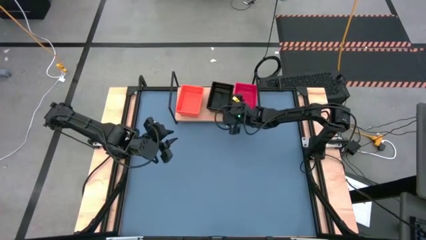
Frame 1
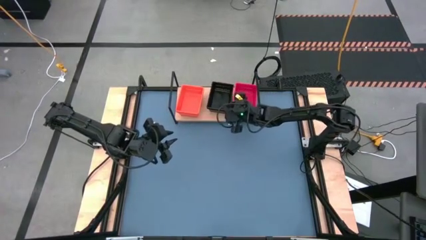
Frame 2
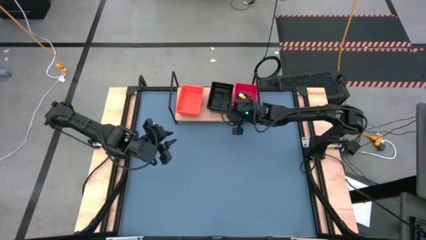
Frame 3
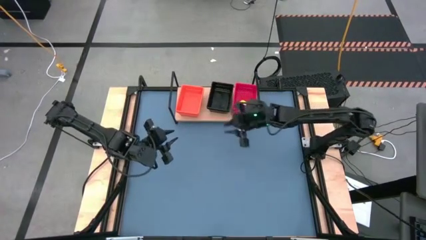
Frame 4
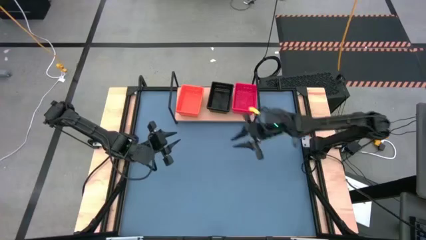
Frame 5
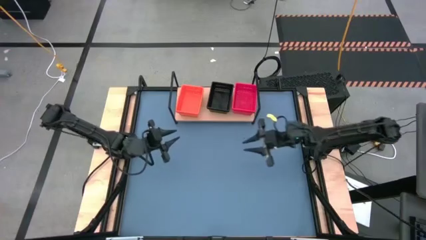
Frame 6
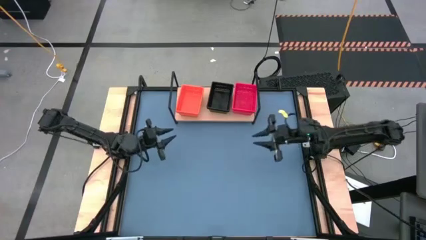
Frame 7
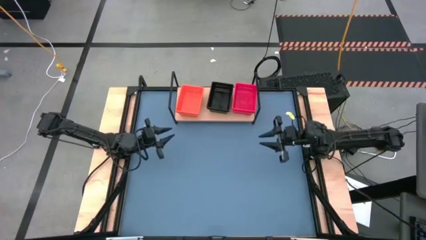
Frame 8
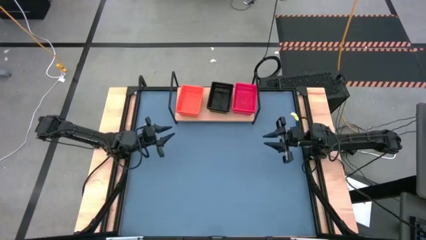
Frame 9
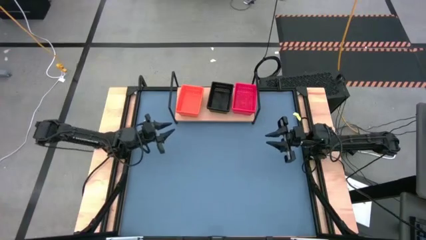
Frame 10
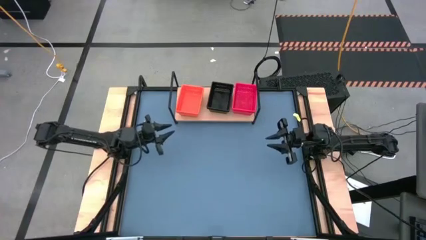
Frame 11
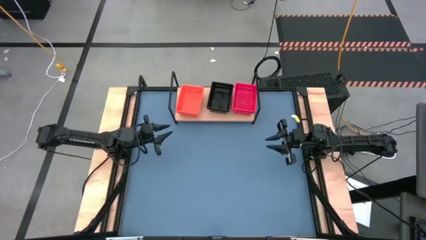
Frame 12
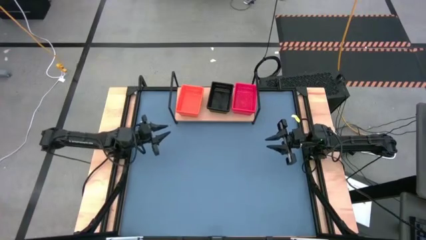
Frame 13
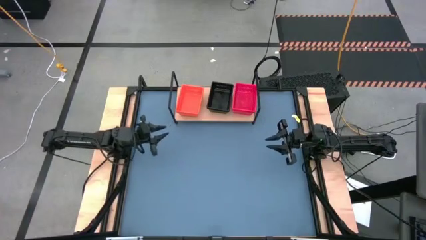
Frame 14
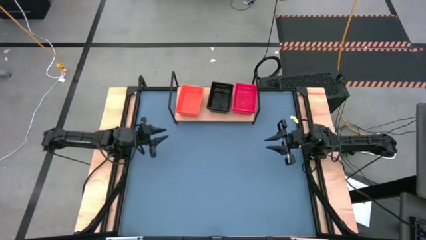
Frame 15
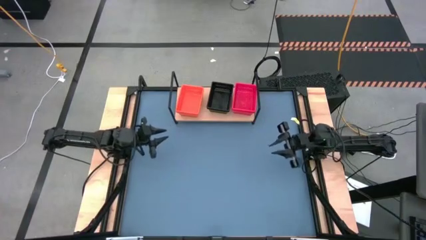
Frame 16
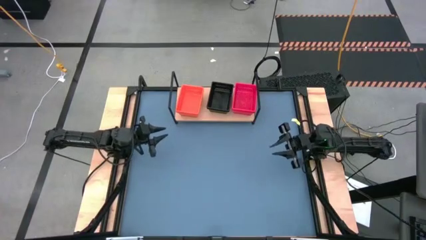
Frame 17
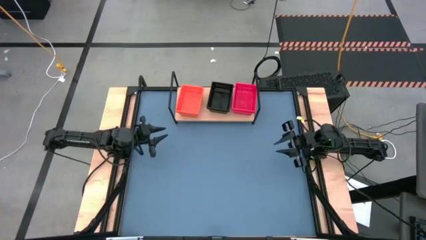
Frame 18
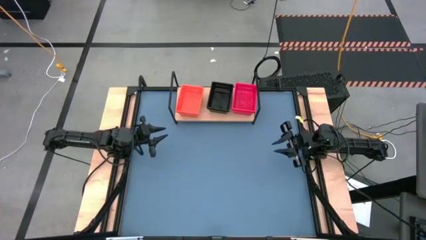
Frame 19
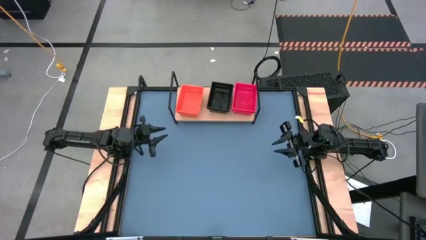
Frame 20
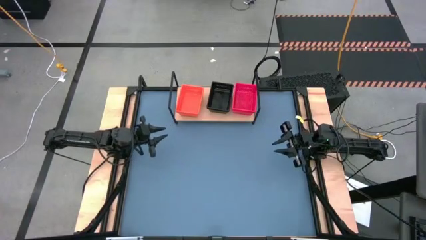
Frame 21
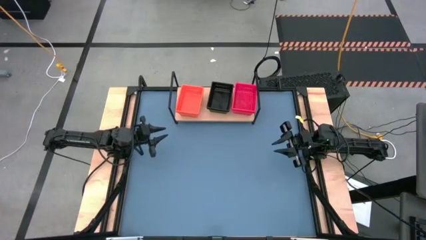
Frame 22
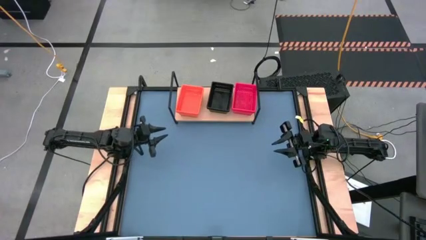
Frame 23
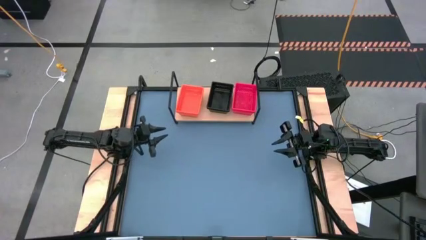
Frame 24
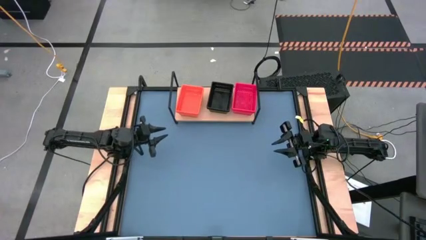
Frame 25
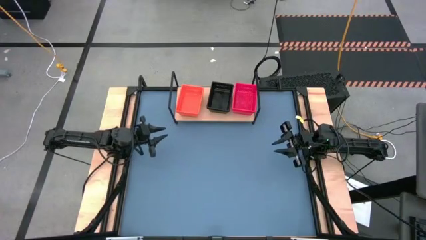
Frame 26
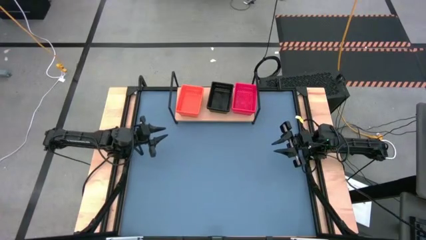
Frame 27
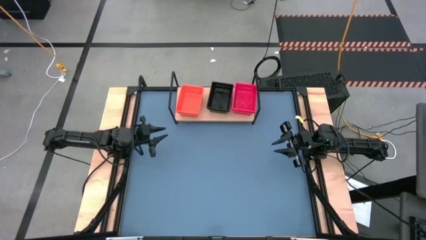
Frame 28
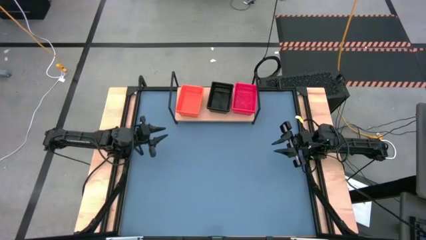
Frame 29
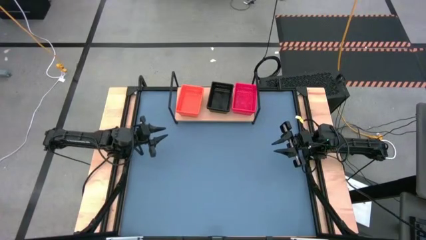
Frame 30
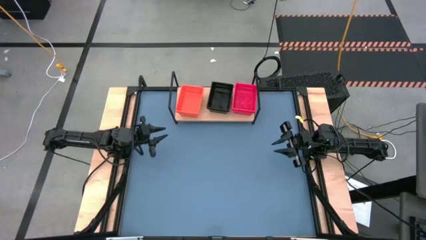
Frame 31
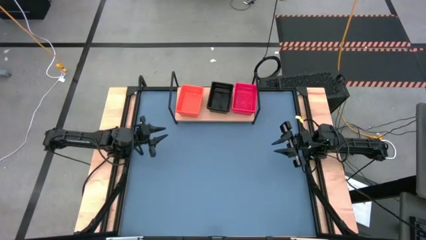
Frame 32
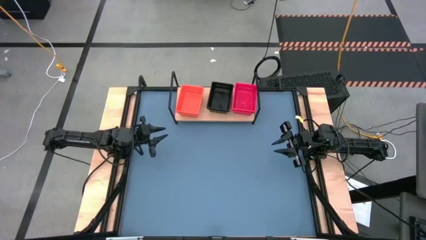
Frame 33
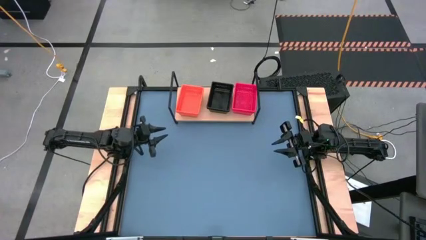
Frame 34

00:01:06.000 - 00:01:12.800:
Task: Stack baskets on shelf by color
Return to Home Position

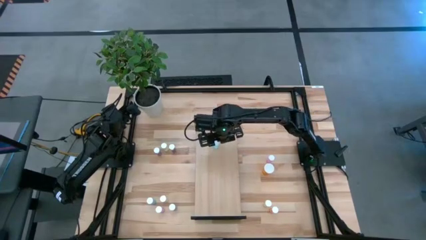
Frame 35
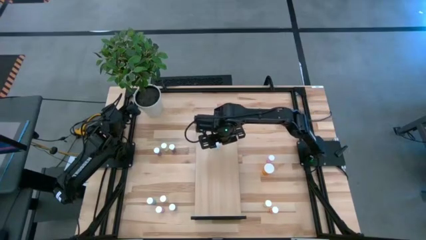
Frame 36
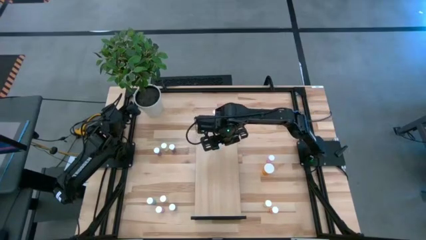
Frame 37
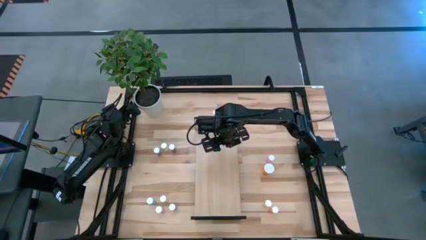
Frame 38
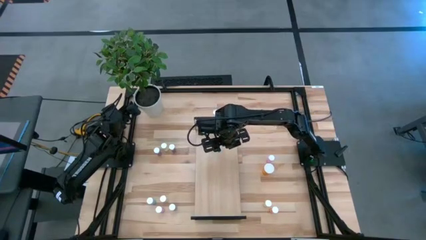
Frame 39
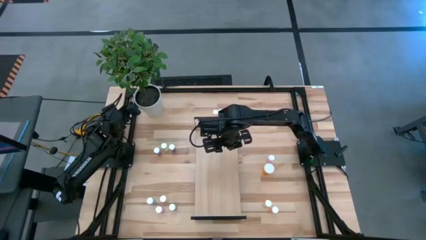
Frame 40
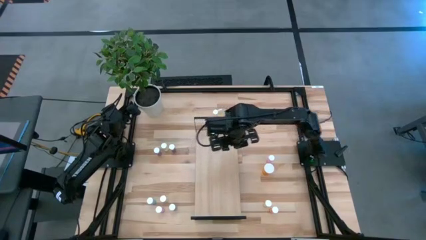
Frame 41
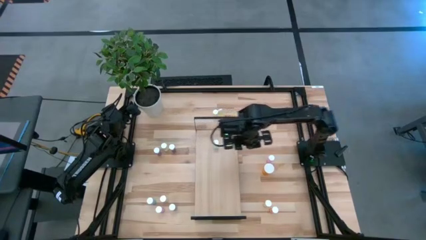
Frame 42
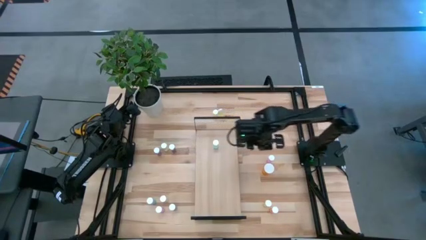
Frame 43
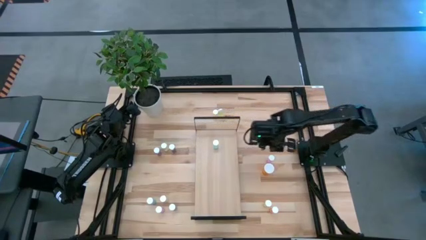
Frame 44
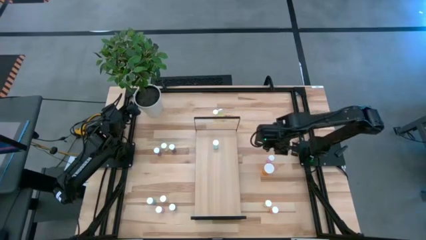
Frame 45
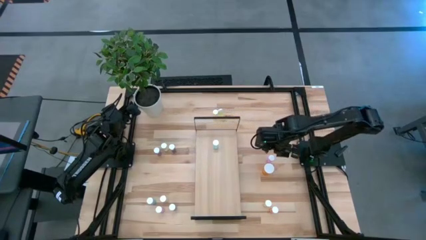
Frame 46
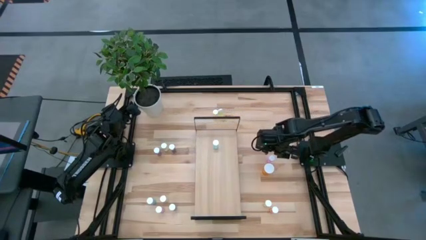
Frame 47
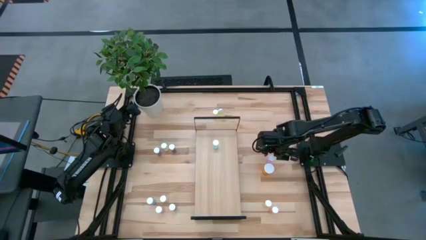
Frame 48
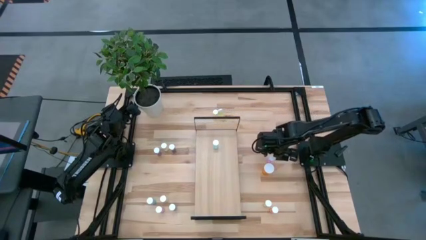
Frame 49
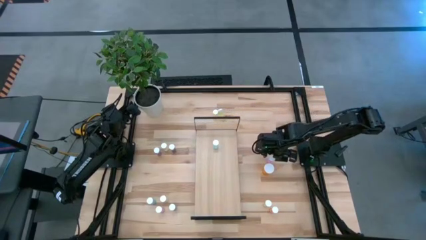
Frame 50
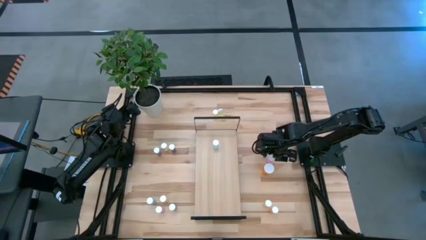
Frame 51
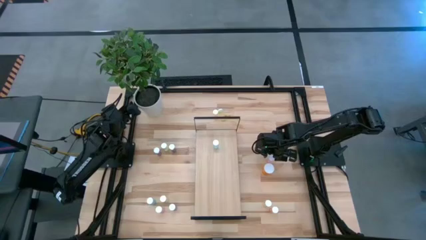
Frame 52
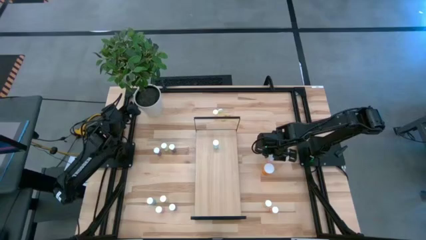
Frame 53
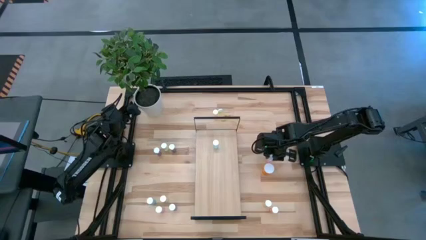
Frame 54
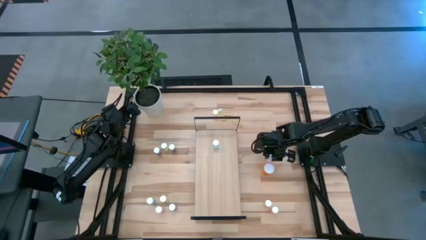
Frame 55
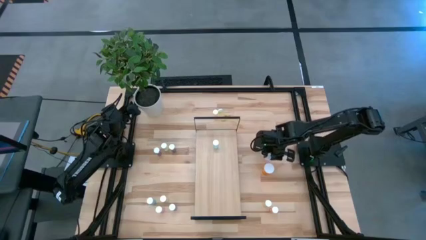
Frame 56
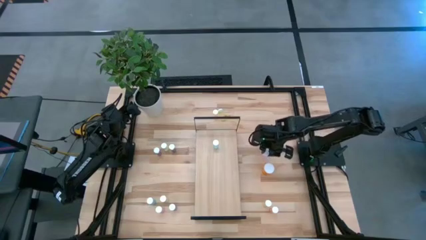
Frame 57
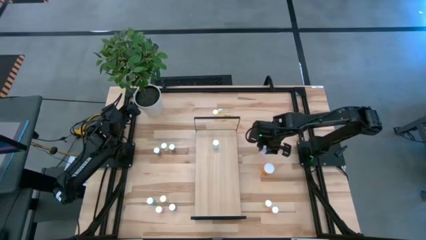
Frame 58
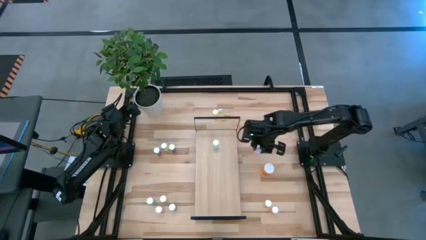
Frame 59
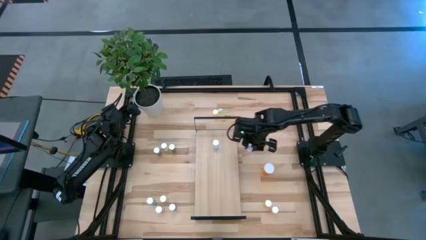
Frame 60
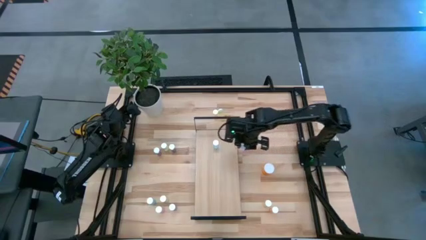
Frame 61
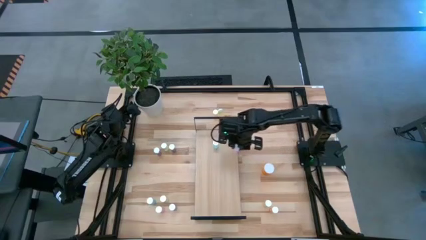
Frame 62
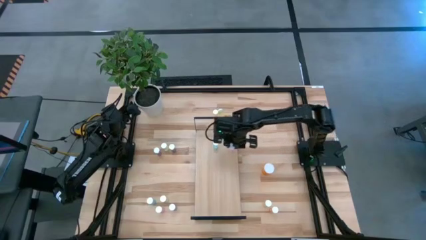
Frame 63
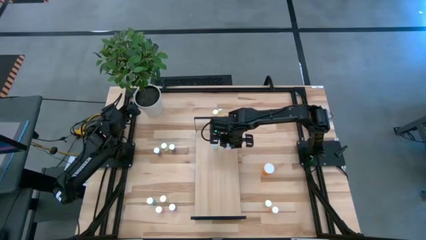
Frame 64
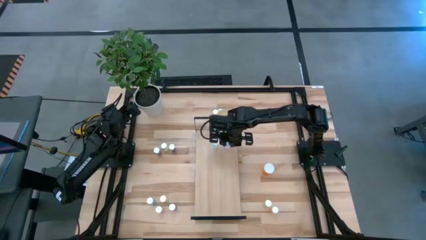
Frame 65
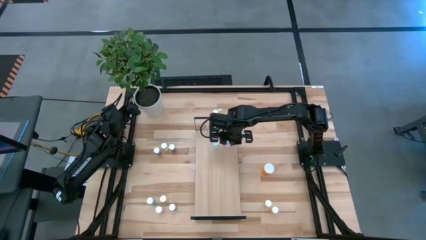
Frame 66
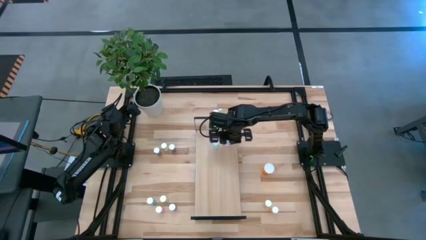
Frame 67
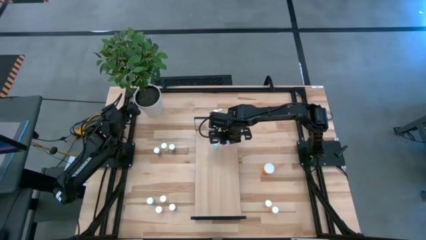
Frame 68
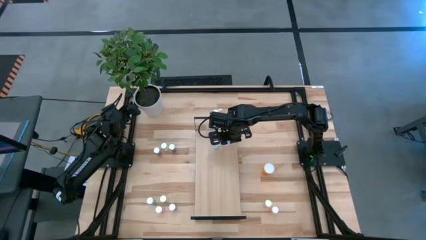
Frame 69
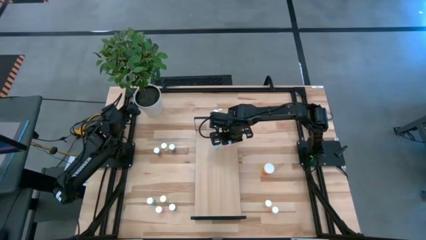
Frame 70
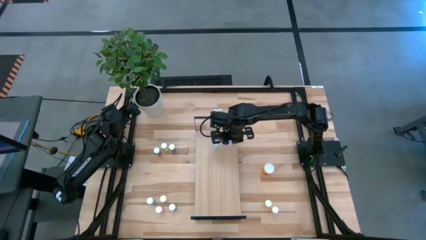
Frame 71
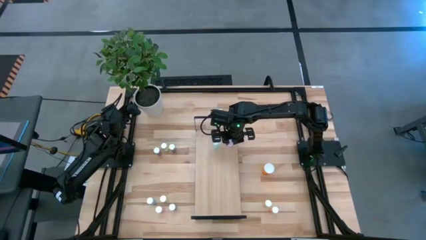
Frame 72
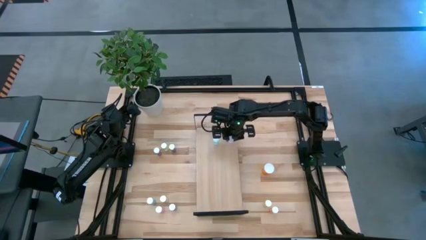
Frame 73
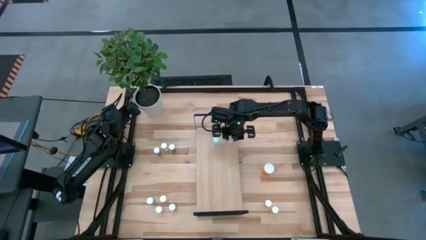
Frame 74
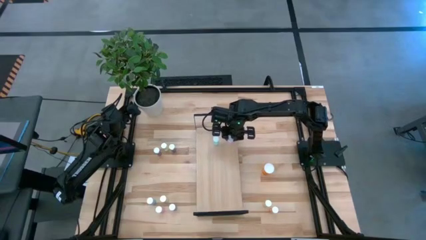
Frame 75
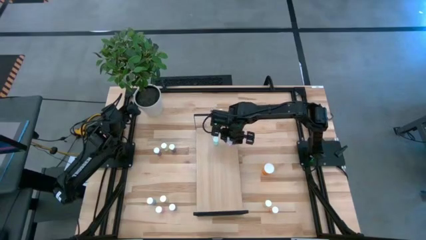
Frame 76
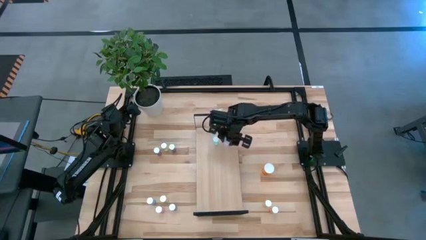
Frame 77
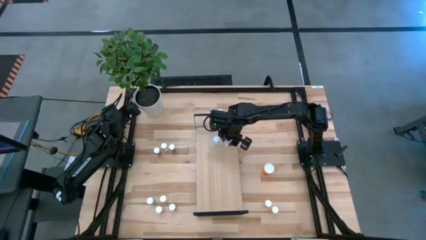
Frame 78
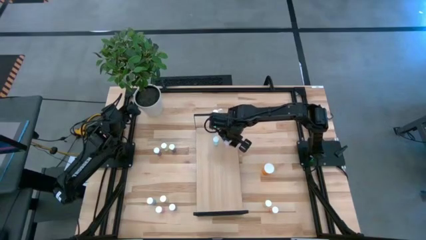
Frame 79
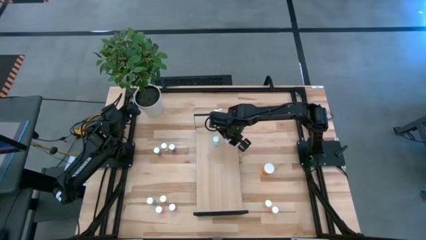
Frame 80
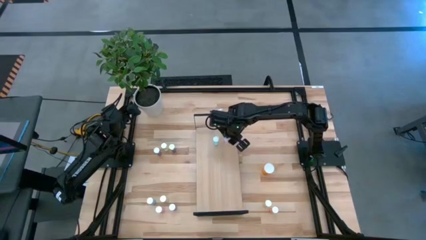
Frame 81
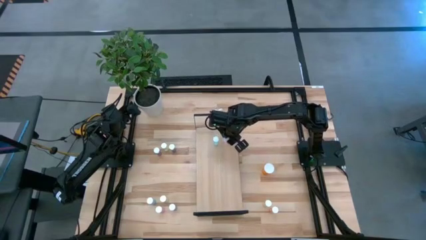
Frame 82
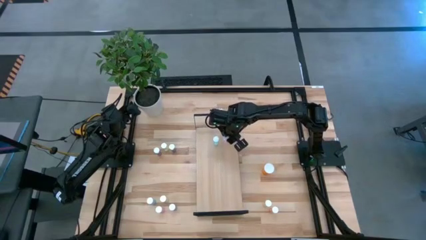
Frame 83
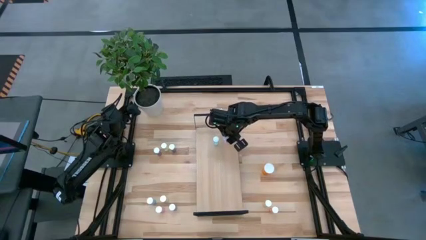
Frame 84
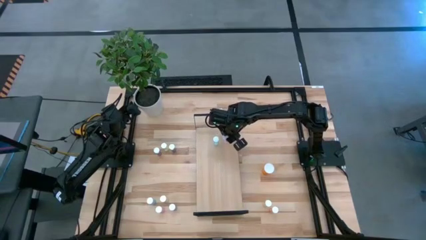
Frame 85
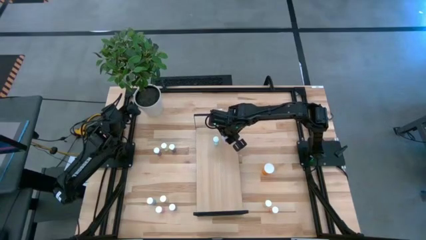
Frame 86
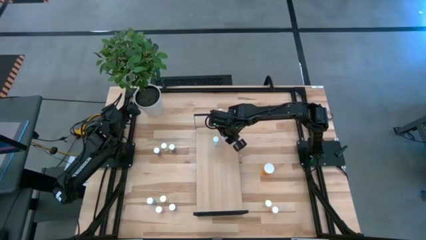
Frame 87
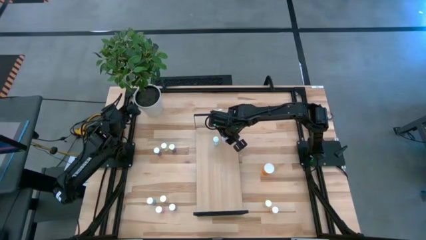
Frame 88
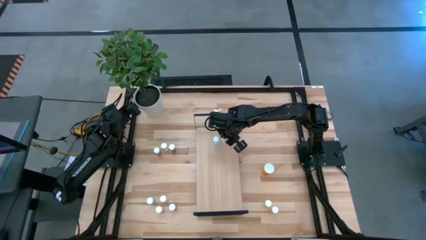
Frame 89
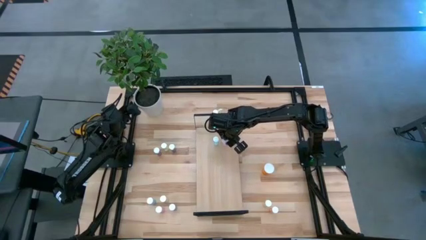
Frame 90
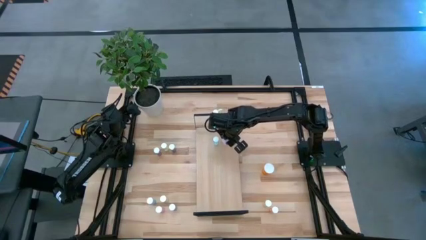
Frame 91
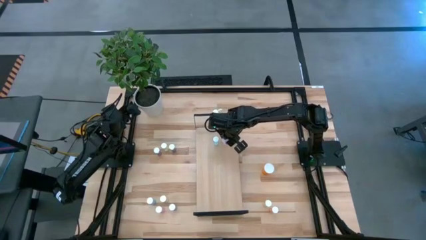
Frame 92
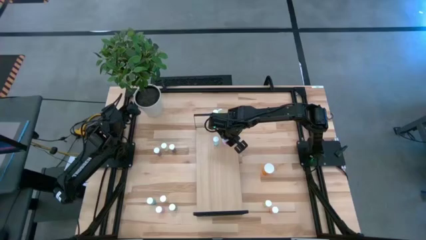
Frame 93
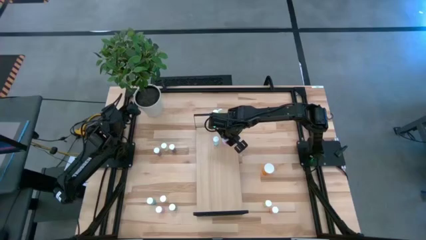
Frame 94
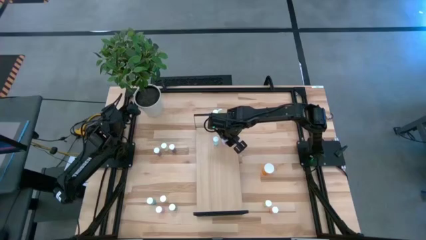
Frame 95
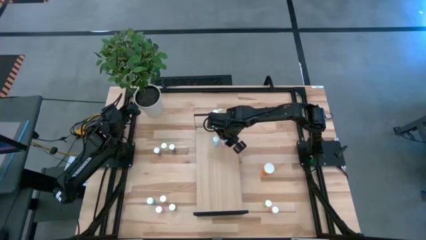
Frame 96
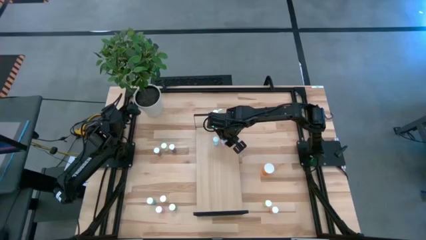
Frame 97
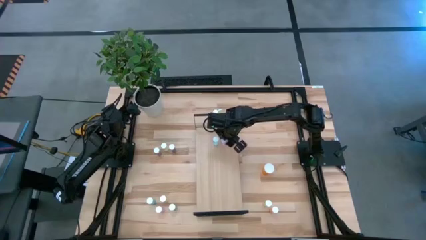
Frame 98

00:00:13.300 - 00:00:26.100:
Task: Pick and place medicine bottles onto shelf by color
Put the pink pill bottle on the shelf
